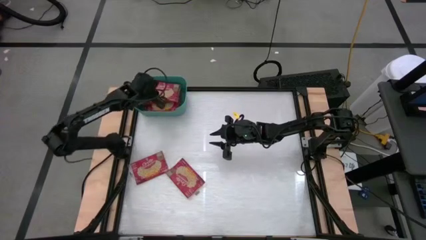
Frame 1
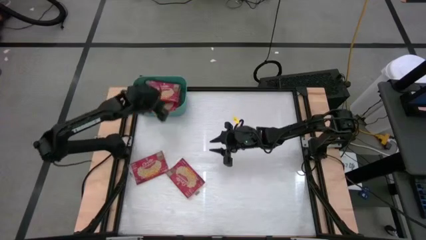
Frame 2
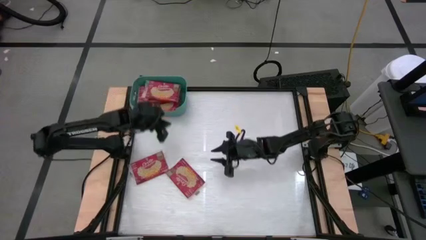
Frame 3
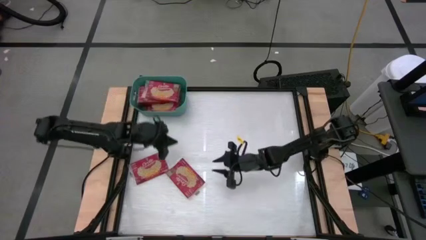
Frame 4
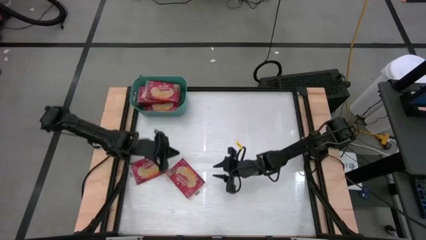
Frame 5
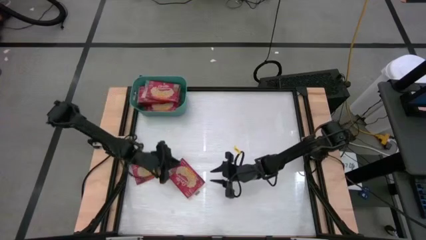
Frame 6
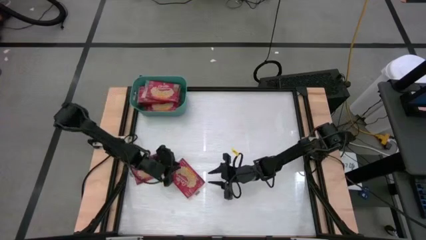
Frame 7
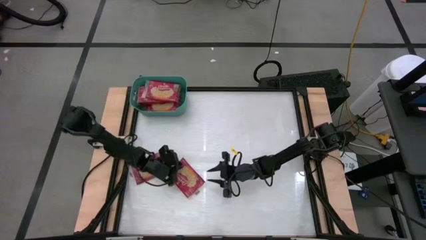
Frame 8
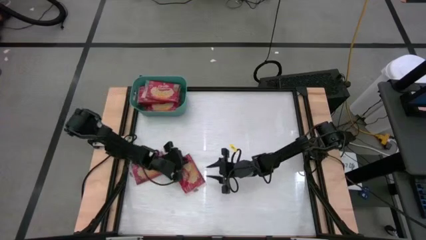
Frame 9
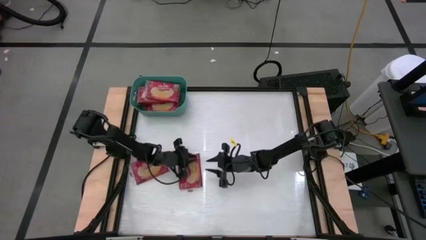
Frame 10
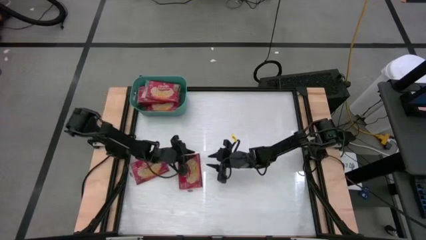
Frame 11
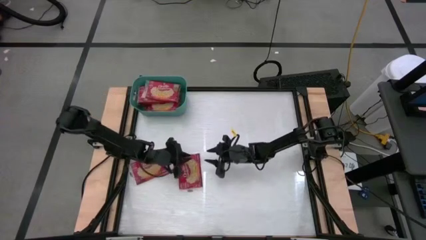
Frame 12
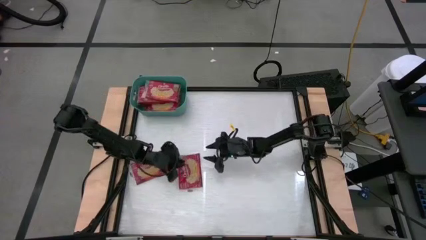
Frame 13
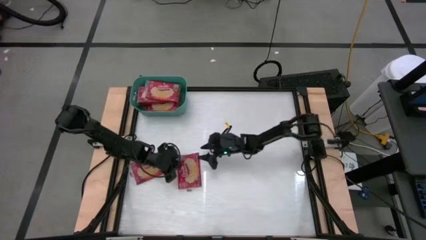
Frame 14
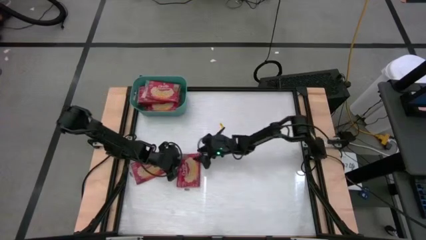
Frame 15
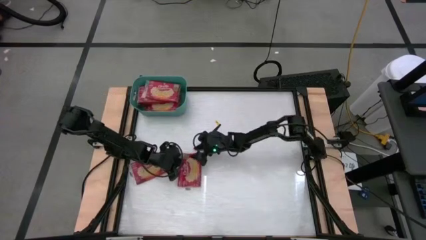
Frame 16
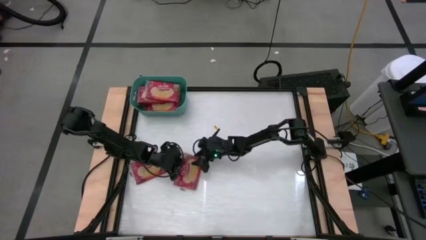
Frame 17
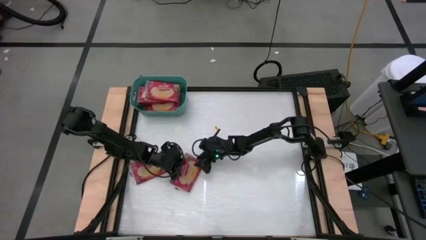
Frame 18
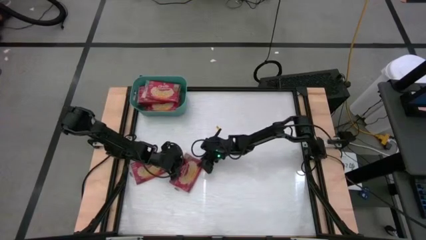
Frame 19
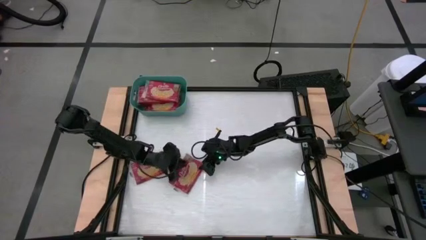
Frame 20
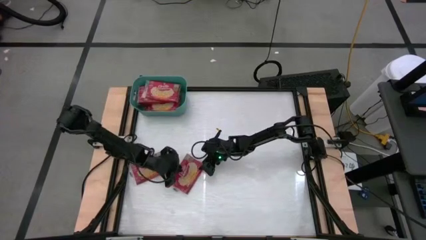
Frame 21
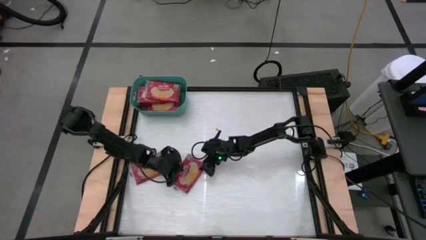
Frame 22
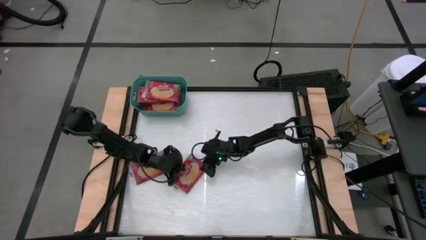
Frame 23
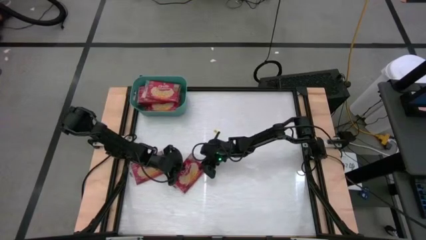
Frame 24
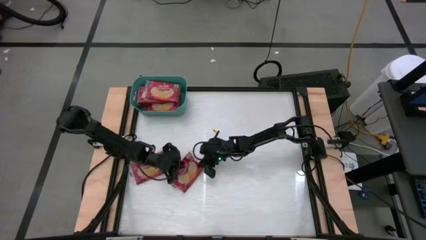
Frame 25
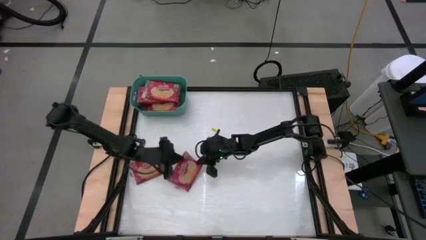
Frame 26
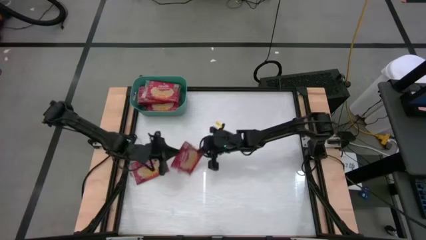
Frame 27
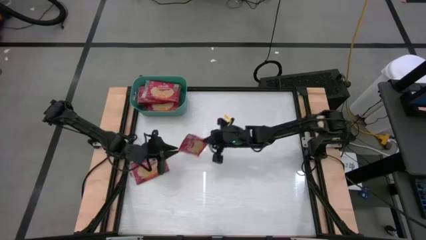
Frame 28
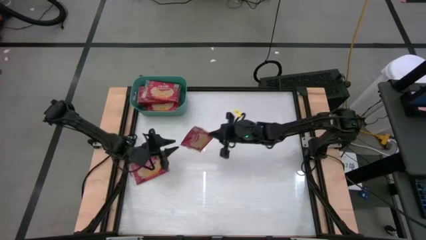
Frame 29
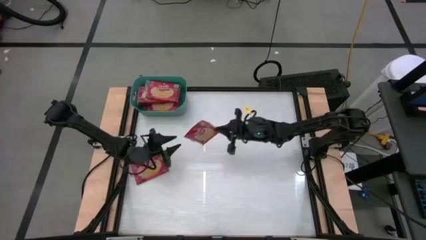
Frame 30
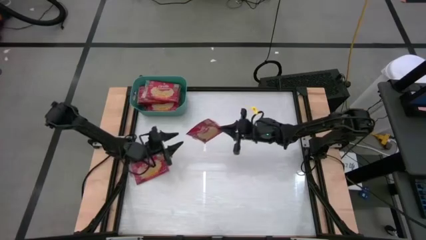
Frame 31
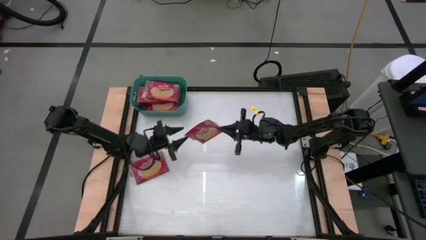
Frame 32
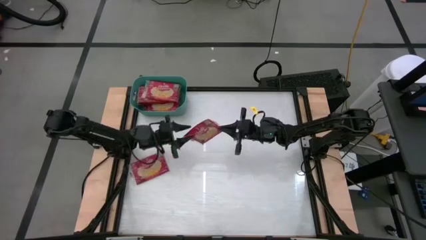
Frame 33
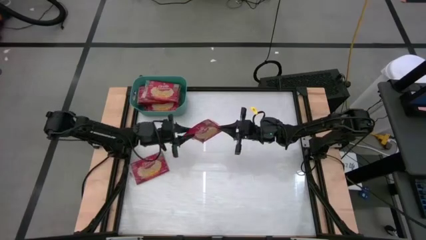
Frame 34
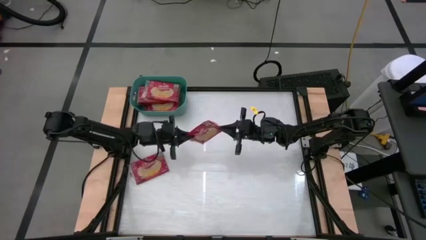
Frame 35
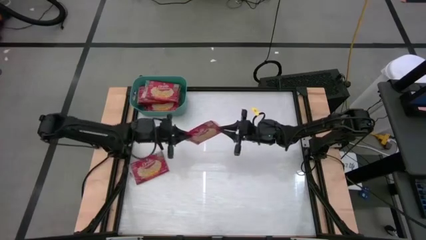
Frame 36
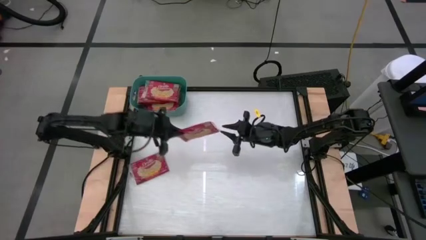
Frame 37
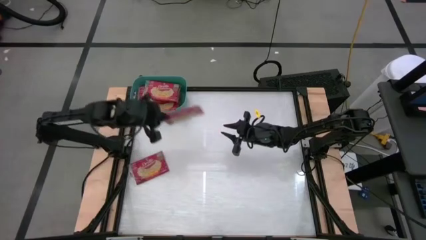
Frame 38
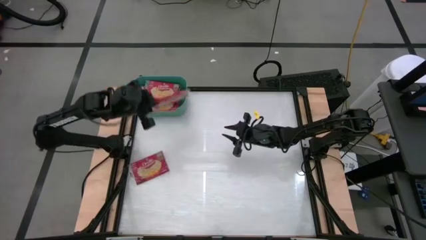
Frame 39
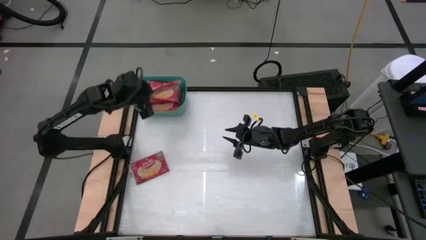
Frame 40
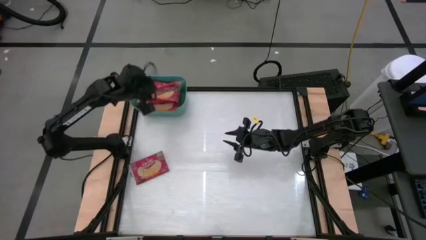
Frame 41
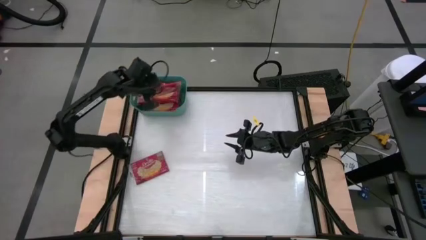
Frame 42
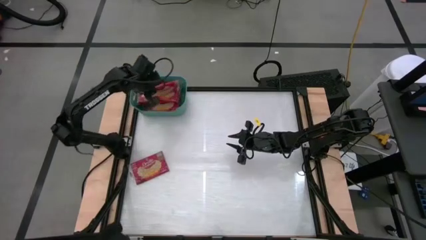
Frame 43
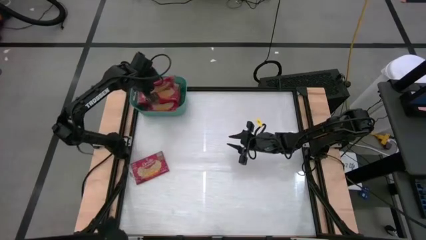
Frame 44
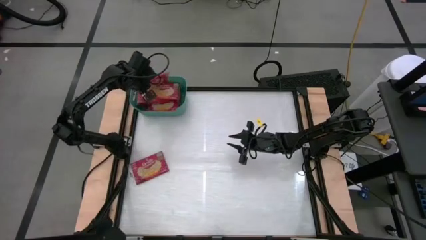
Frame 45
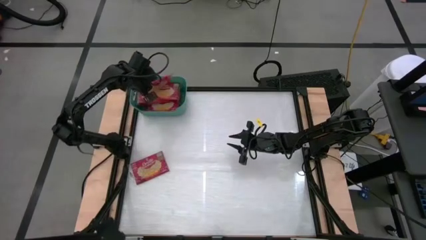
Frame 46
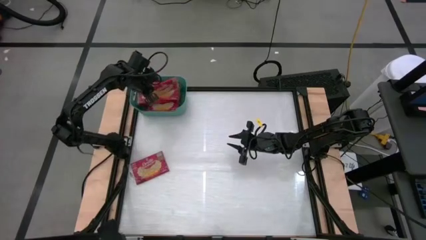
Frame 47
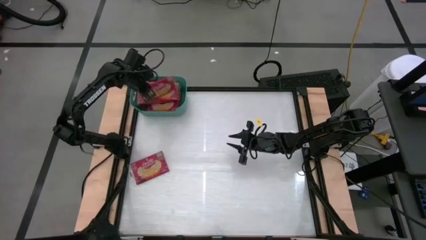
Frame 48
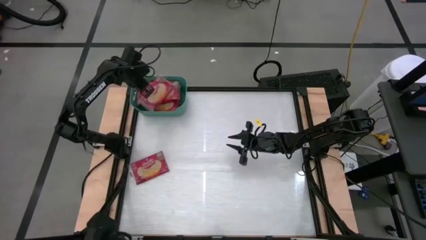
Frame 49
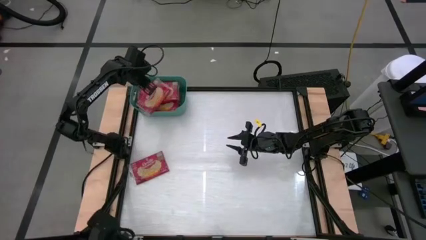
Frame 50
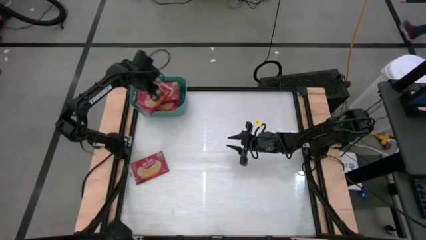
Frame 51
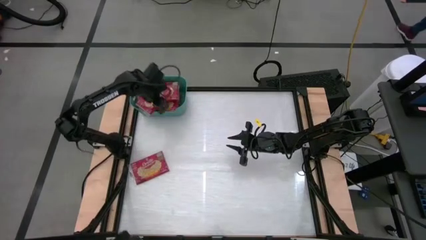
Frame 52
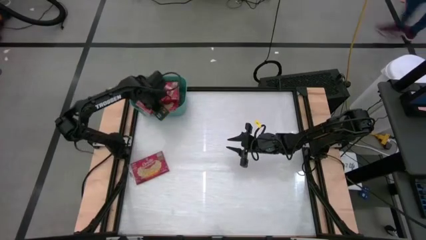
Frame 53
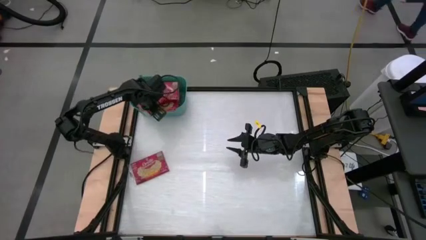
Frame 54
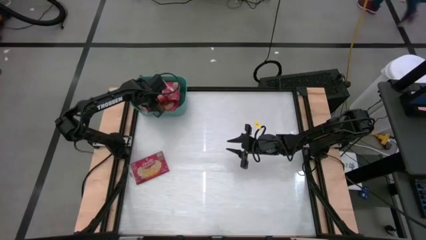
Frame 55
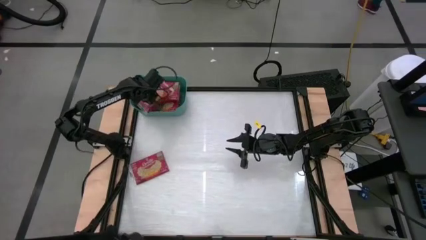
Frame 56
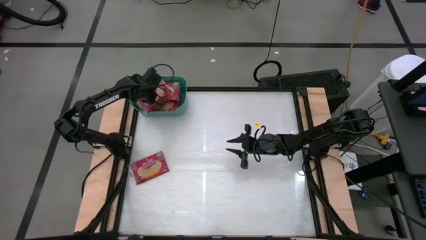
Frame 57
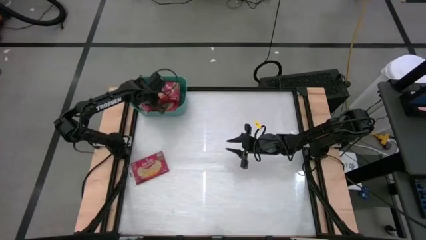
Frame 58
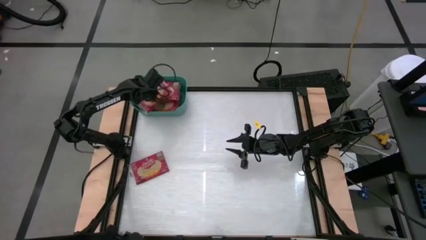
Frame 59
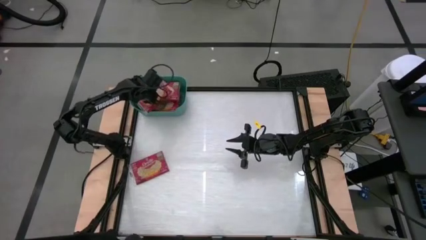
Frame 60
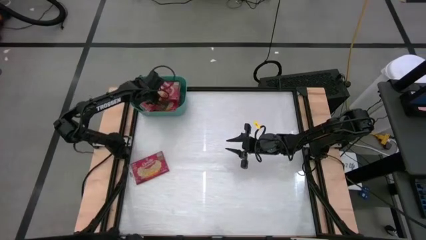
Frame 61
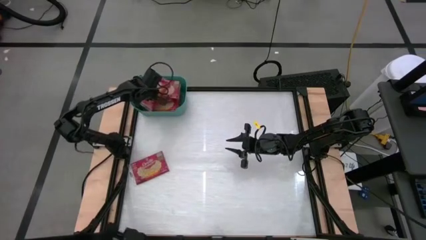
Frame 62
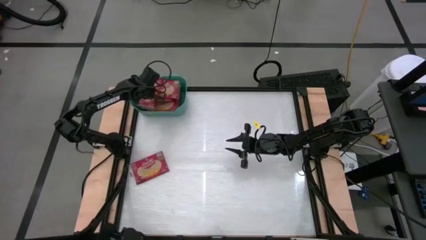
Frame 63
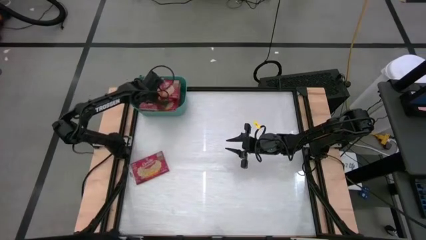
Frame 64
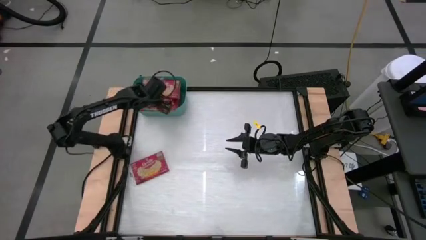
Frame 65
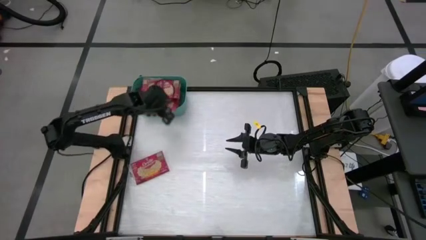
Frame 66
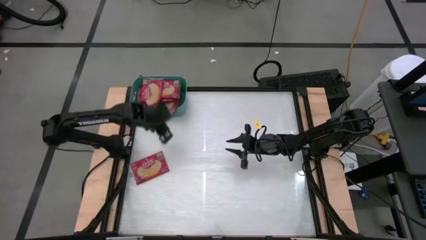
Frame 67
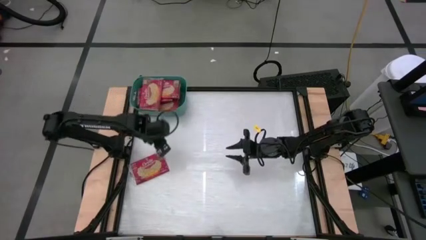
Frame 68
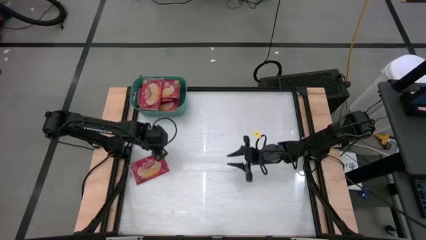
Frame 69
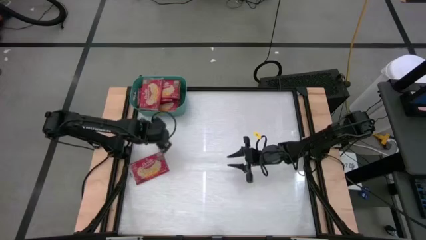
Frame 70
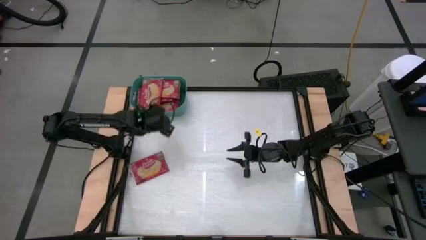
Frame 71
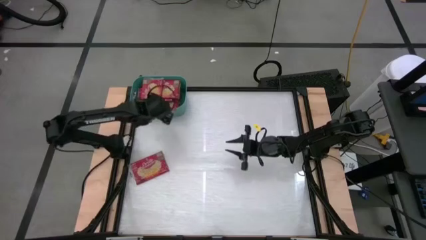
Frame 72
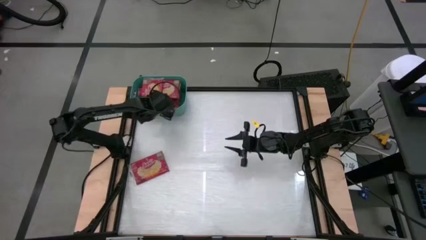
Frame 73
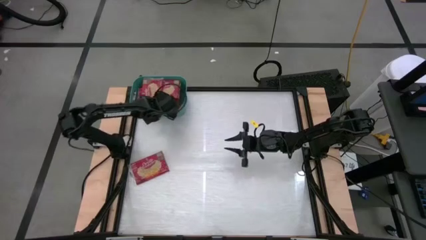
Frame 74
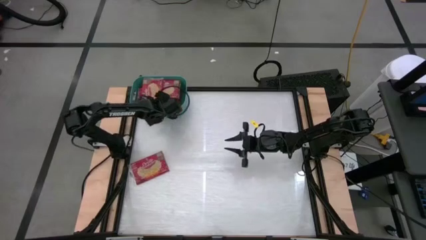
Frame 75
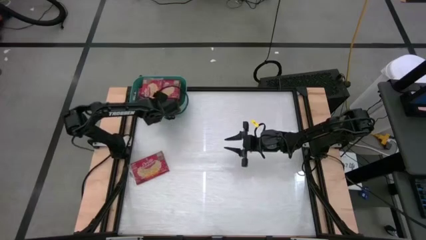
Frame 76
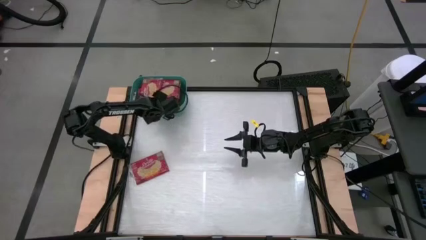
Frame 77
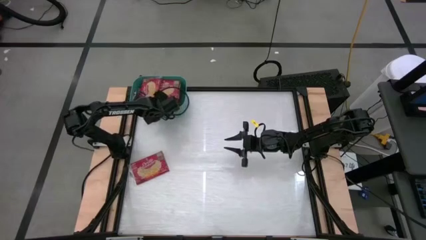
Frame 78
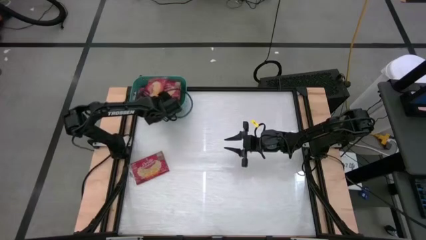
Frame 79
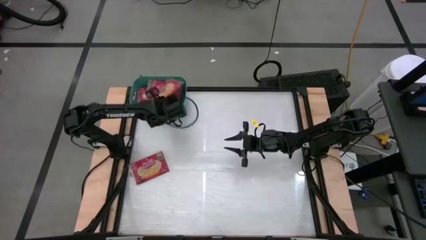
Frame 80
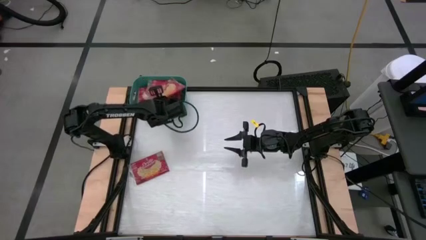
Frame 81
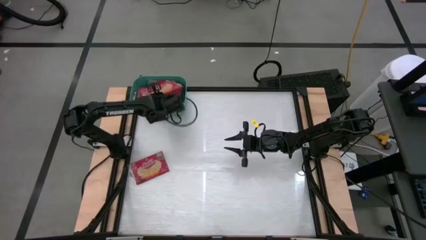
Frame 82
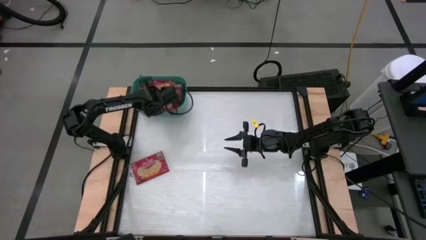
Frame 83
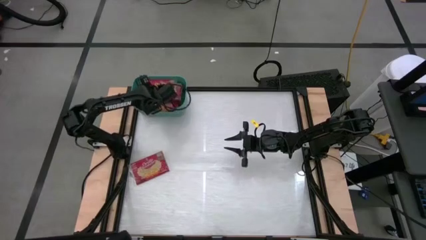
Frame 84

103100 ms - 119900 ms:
Task: Sort popcorn bags into baskets
Stack the red popcorn bag on the red popcorn bags in the green bin
